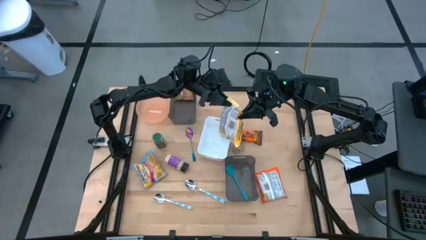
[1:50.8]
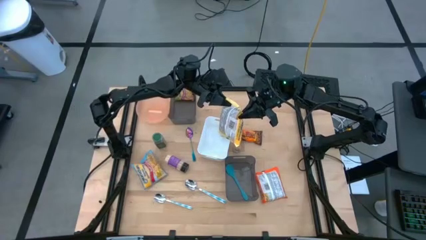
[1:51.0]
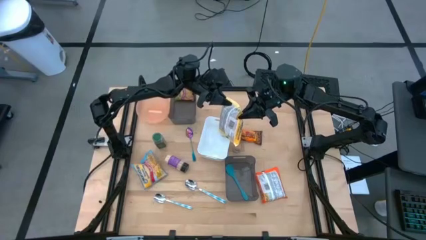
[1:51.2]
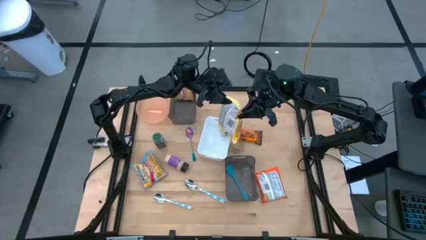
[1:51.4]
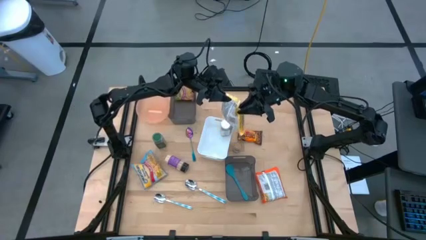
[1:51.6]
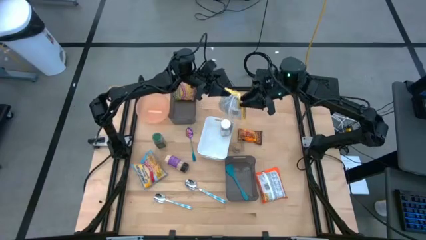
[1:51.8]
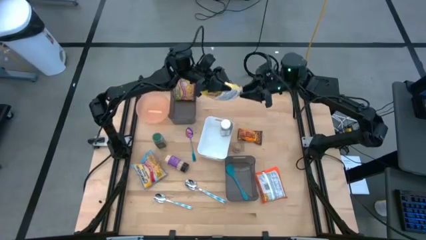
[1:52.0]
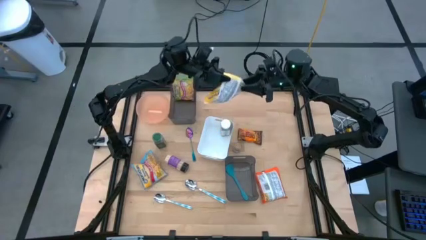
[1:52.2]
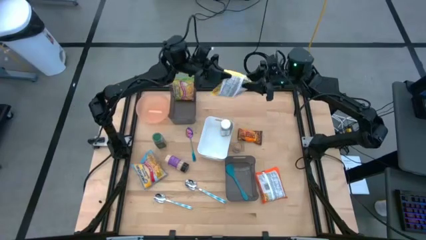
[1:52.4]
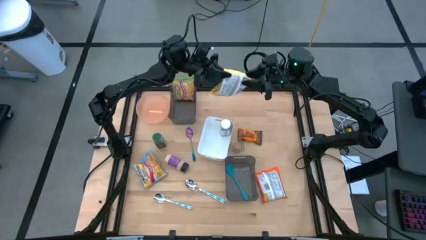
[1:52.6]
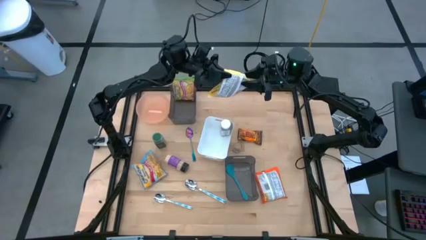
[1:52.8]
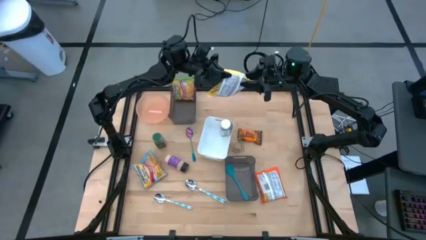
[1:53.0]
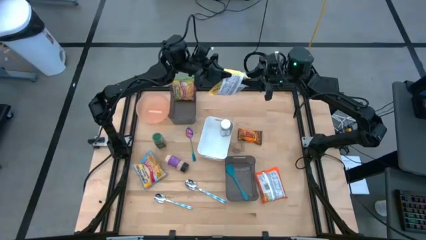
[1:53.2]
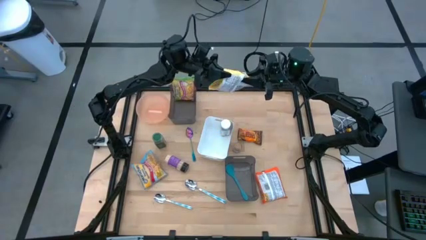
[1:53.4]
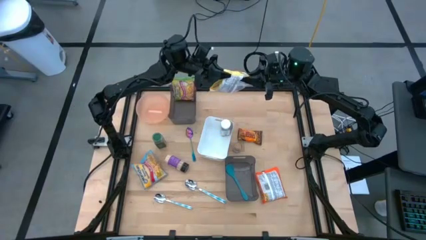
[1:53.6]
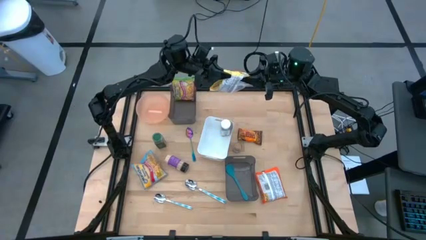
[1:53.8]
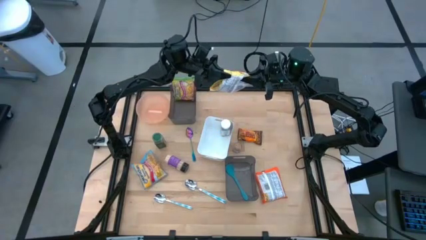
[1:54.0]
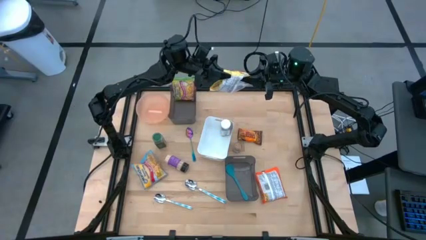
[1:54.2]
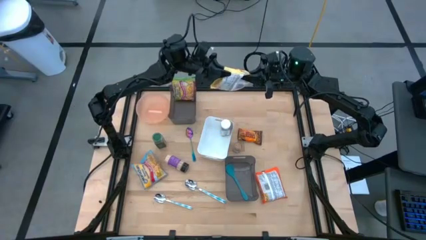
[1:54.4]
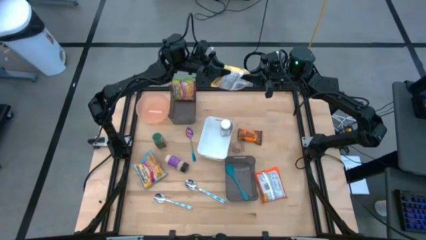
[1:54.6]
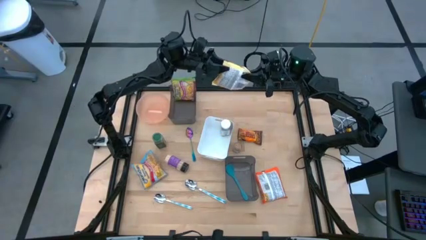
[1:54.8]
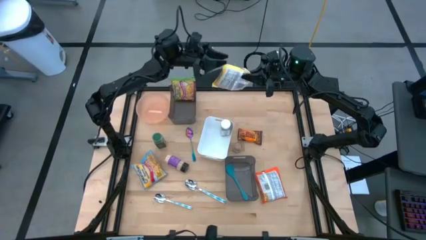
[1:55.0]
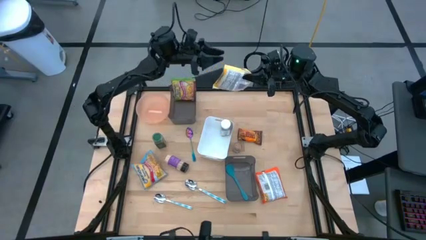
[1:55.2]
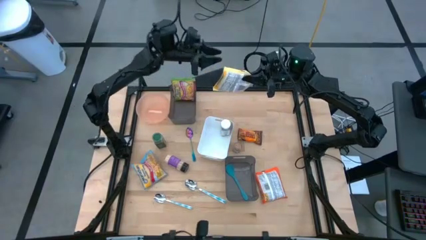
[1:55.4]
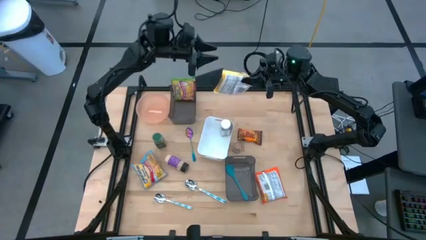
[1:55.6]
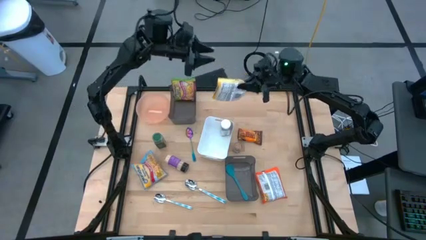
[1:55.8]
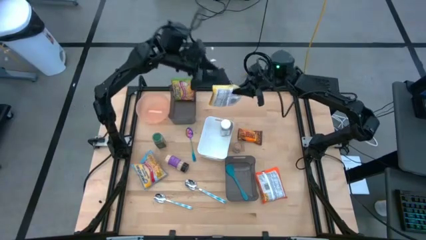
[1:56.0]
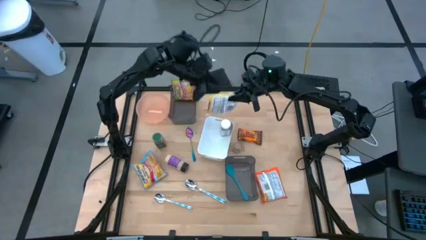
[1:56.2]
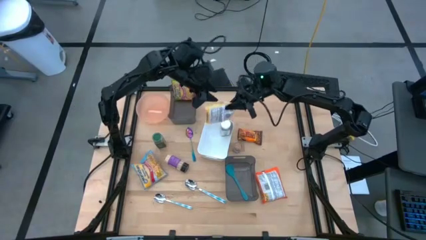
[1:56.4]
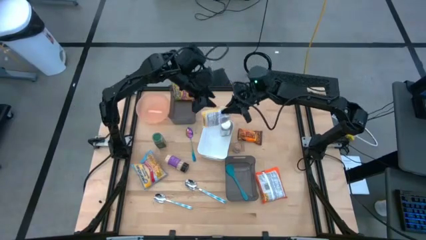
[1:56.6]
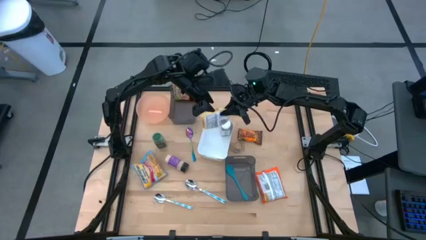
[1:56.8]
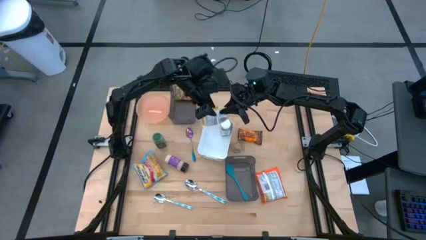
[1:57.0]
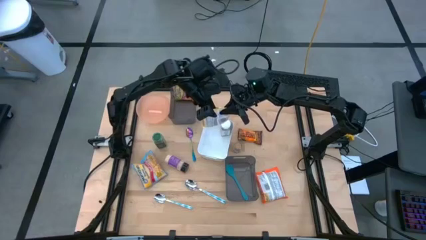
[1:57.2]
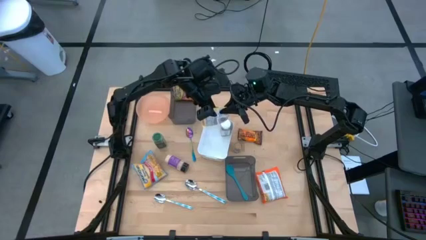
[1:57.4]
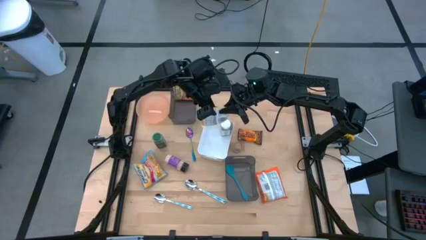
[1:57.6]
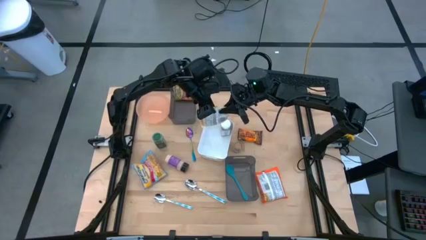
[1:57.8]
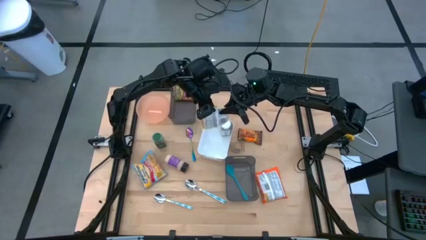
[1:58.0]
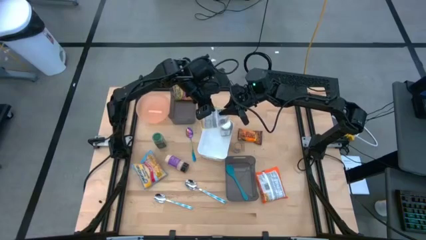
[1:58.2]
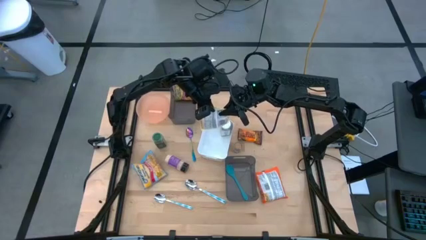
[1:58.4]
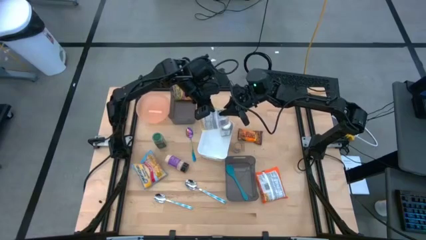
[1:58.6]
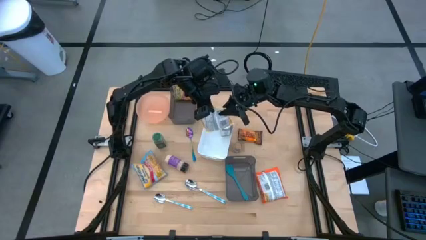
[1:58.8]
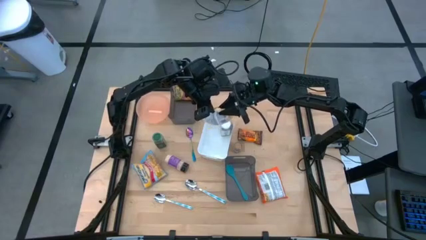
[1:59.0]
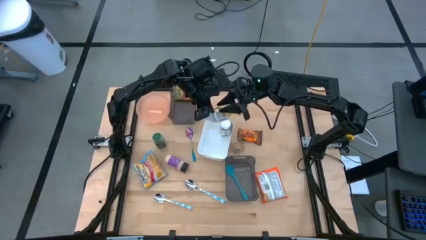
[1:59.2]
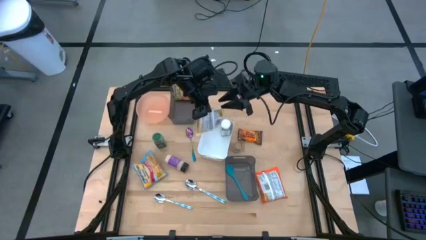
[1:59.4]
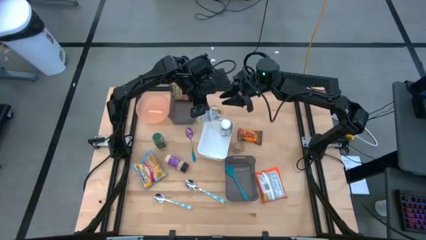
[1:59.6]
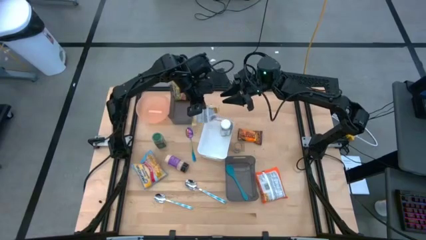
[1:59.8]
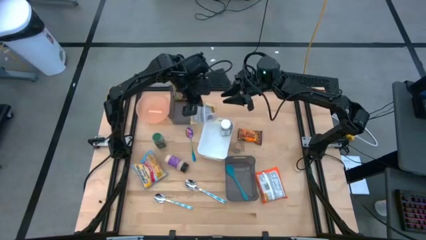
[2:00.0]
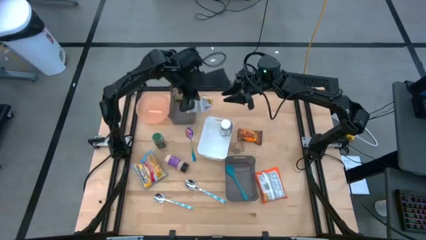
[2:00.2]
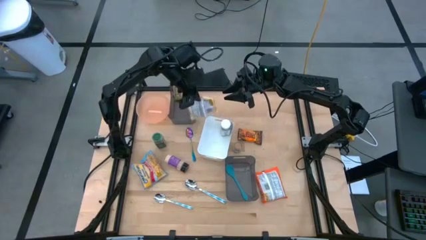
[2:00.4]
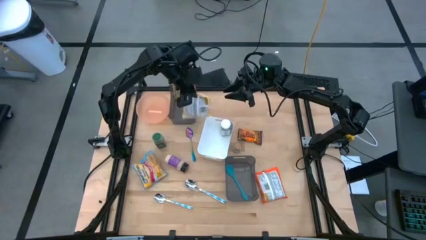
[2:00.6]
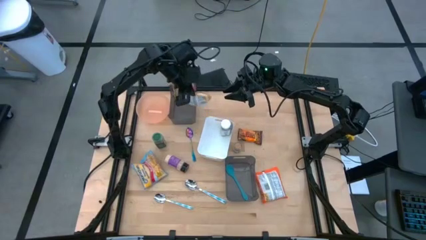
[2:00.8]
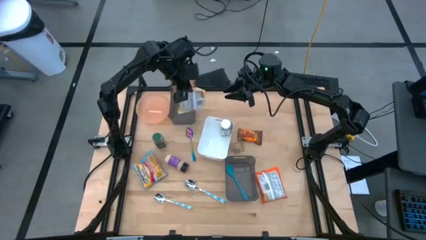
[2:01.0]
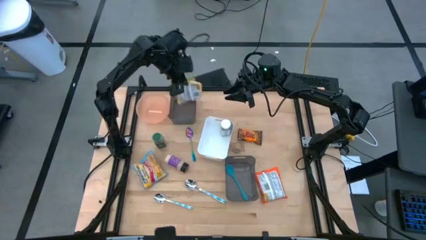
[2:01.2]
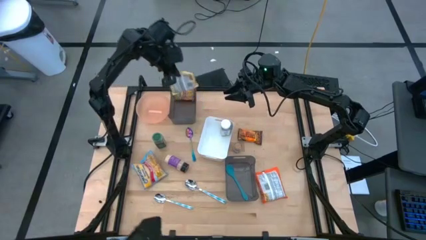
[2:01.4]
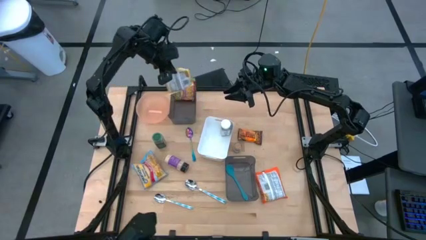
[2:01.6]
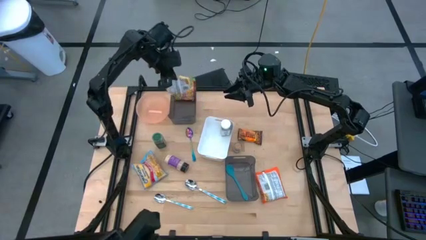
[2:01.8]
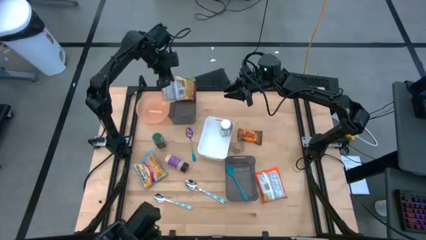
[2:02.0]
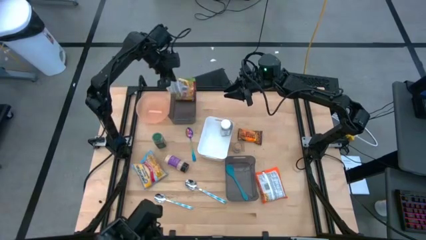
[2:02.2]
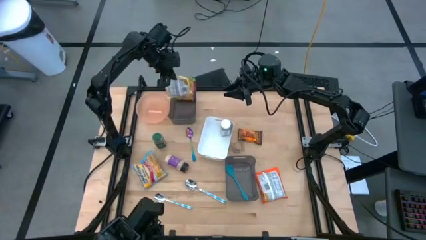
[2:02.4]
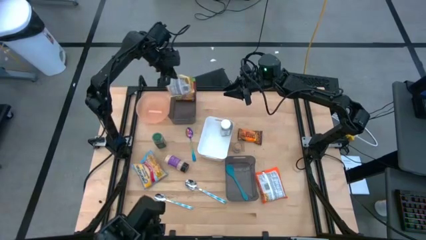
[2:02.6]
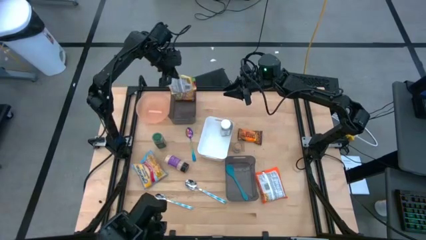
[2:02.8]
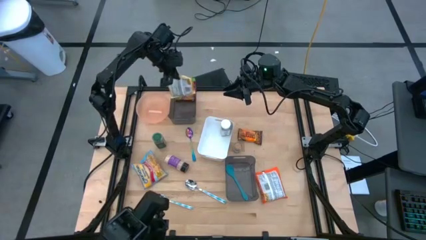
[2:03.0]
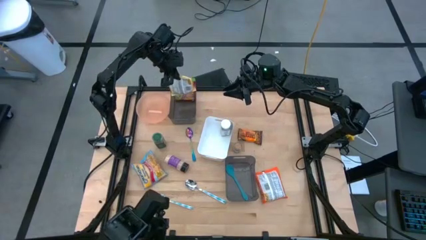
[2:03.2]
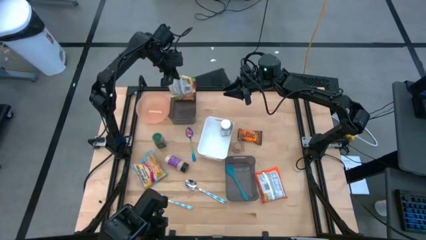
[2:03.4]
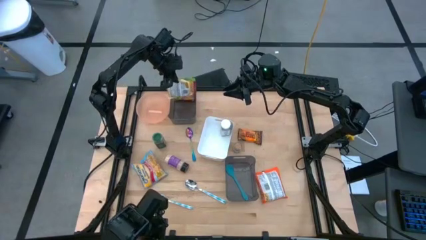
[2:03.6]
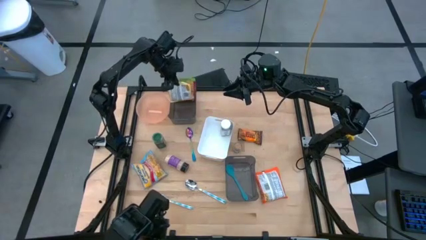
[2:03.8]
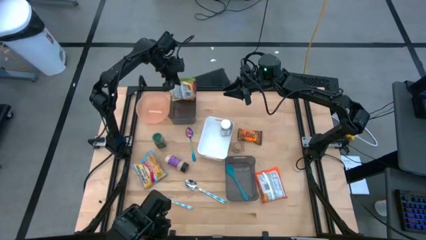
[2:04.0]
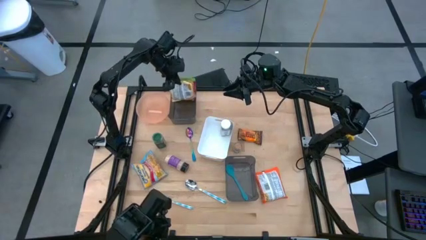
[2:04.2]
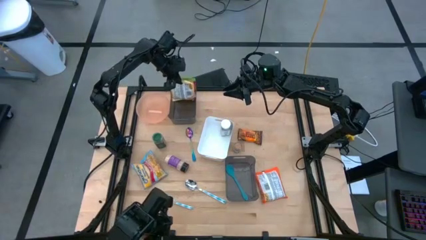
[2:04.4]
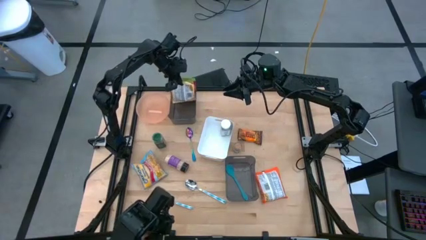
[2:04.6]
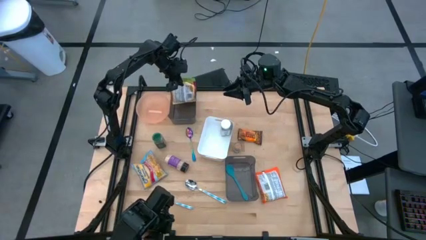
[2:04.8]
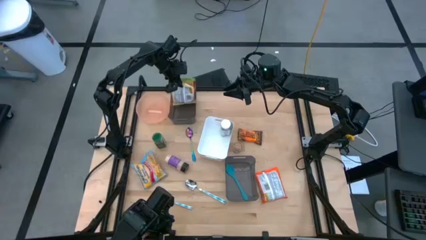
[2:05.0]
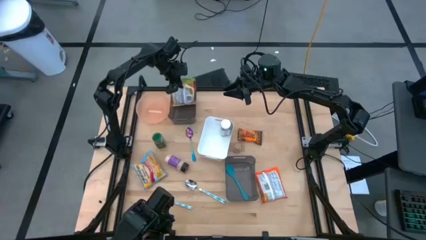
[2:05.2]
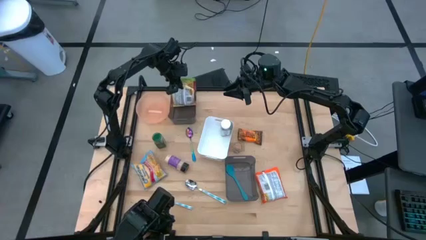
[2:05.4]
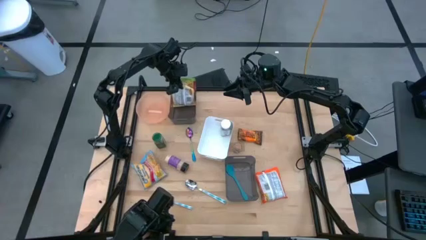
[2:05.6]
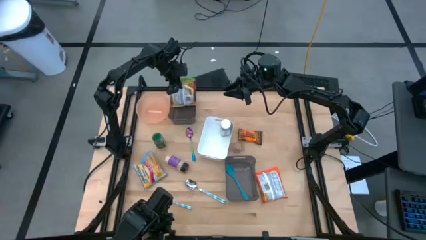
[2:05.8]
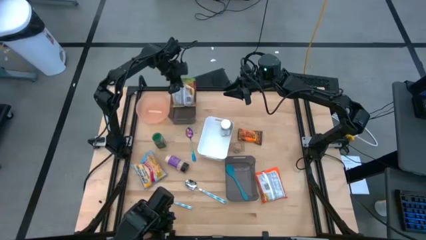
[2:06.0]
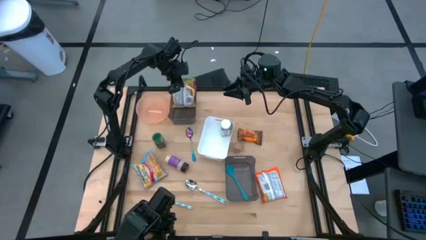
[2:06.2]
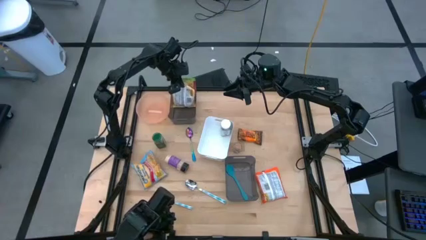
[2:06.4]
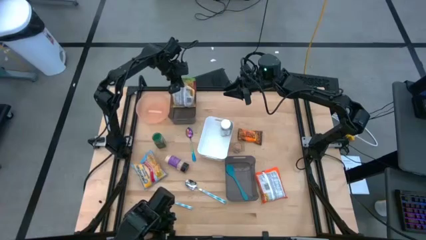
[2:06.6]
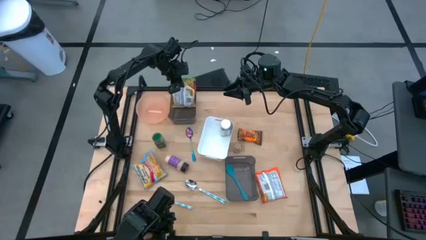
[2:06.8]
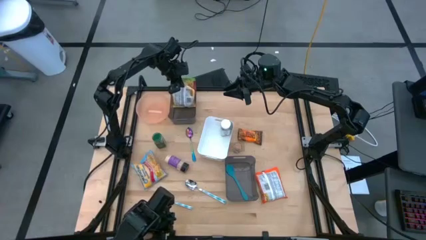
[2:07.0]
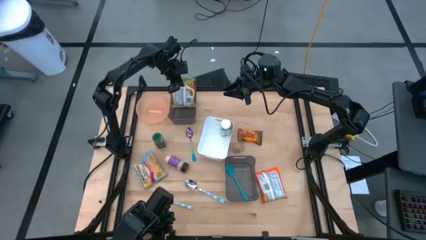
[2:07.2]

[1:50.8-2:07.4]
Task: Pick & Place Food Item
Put the yellow noodle pack into the top black bin
